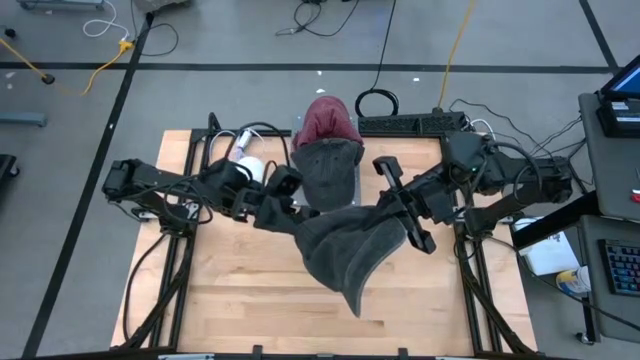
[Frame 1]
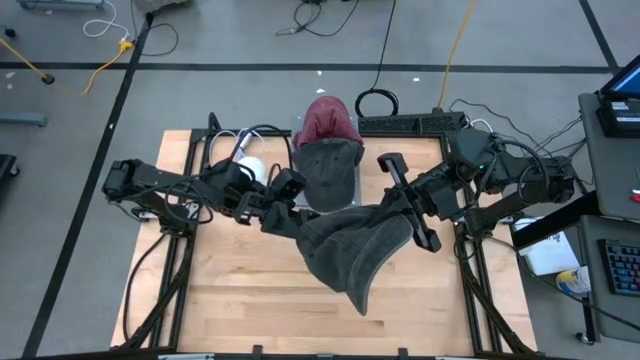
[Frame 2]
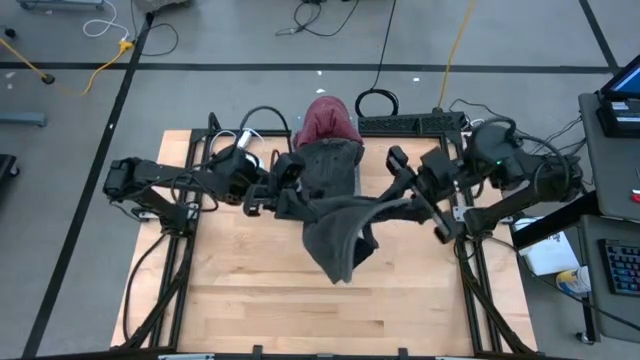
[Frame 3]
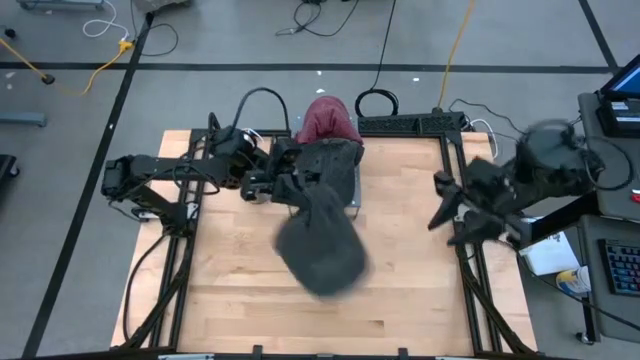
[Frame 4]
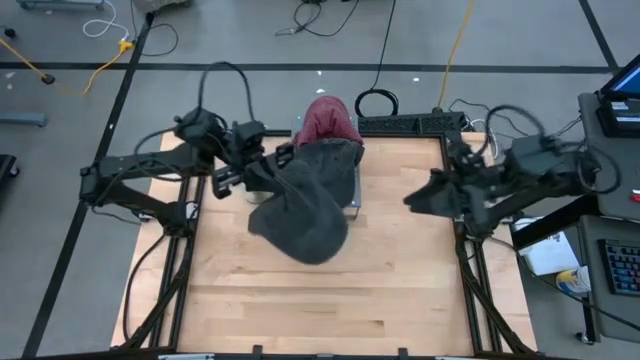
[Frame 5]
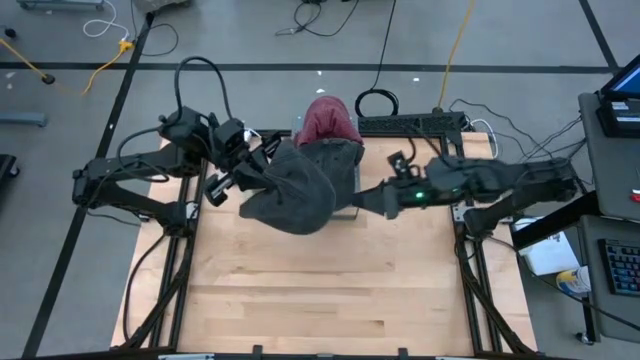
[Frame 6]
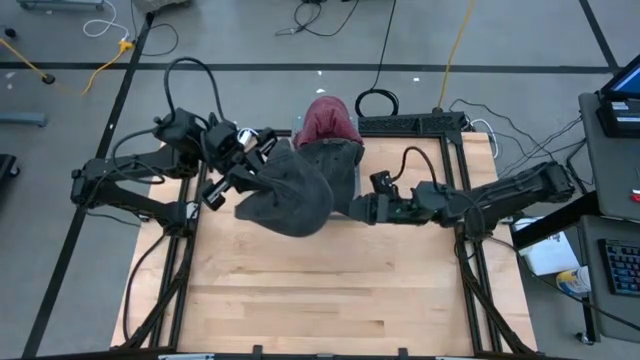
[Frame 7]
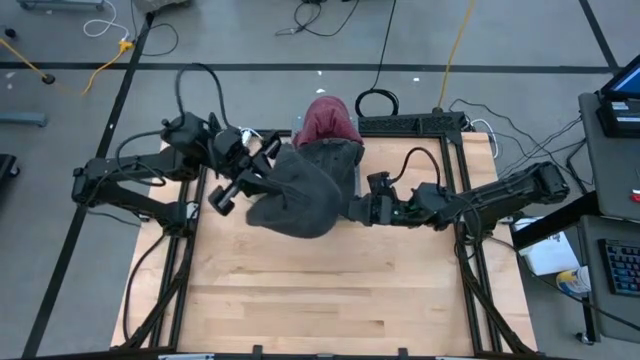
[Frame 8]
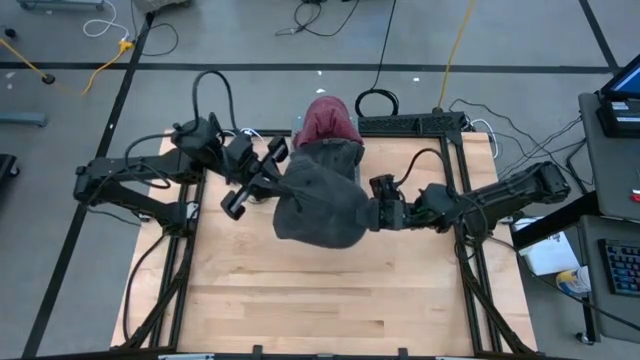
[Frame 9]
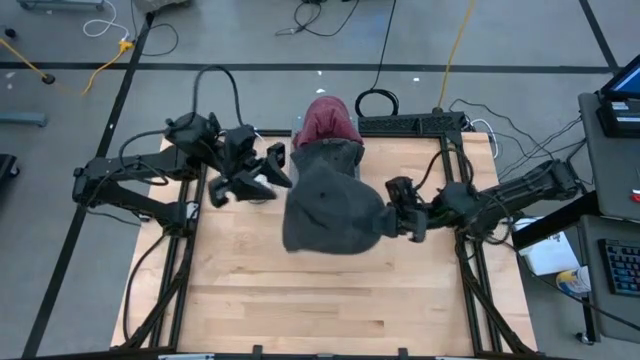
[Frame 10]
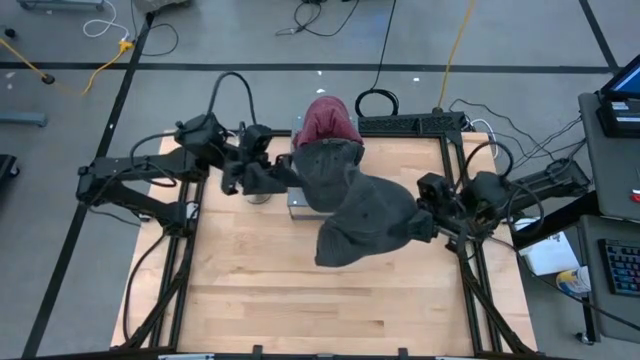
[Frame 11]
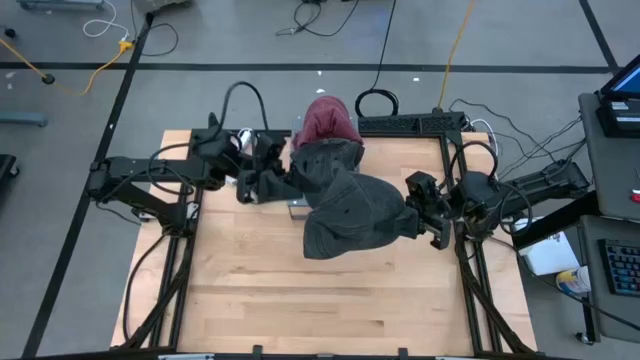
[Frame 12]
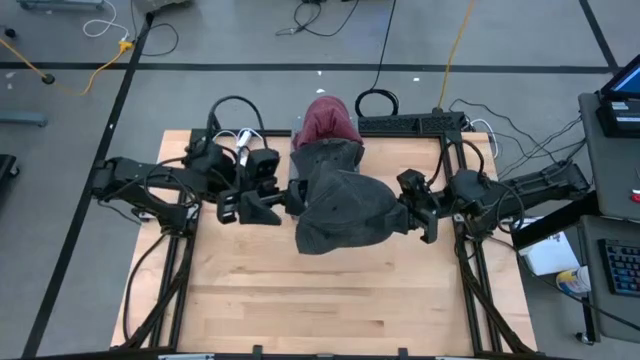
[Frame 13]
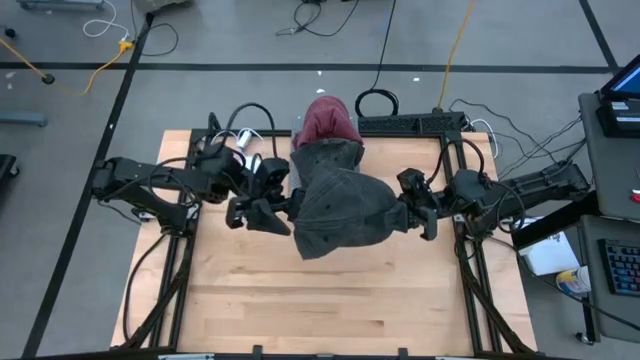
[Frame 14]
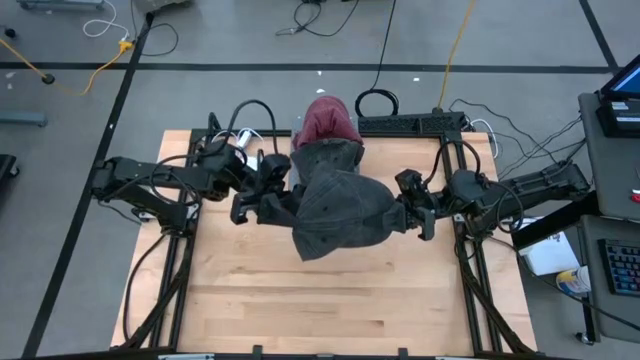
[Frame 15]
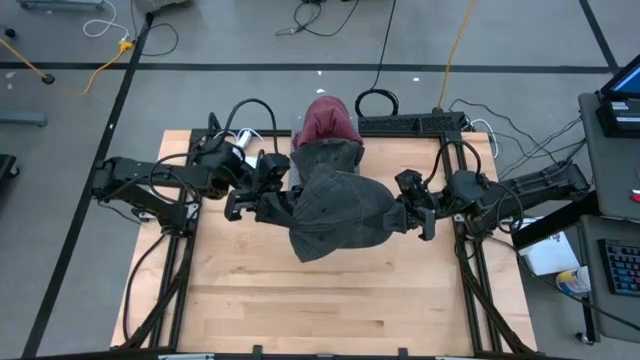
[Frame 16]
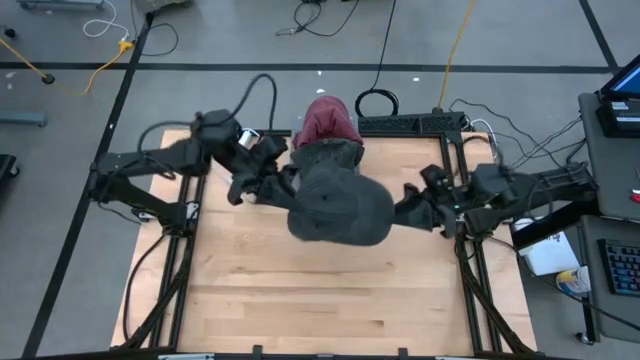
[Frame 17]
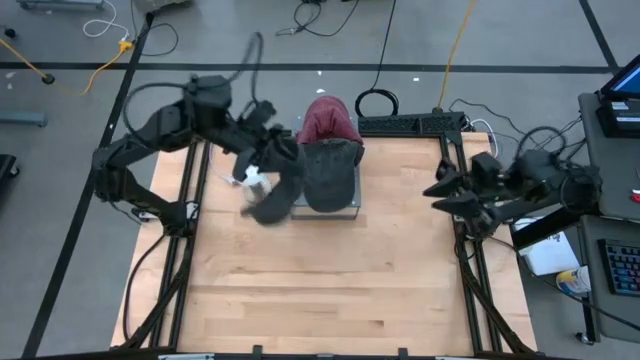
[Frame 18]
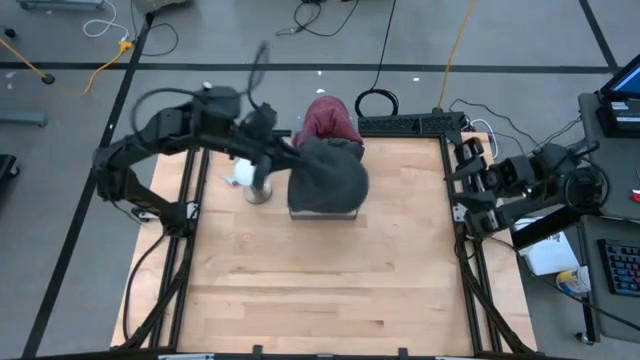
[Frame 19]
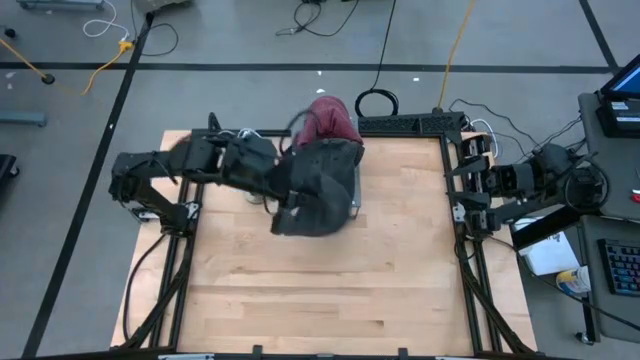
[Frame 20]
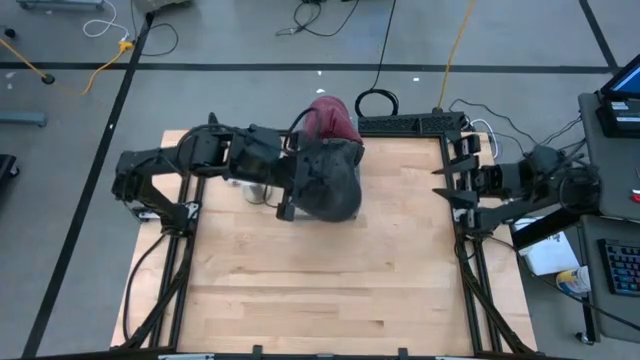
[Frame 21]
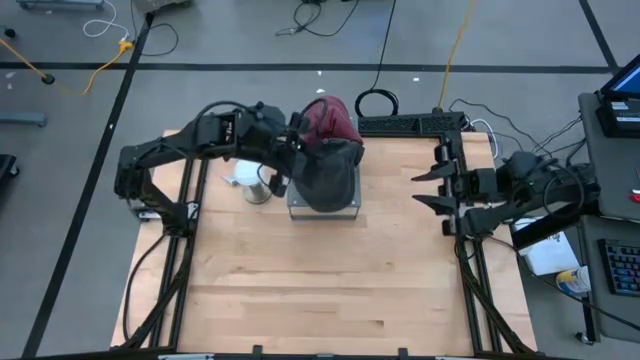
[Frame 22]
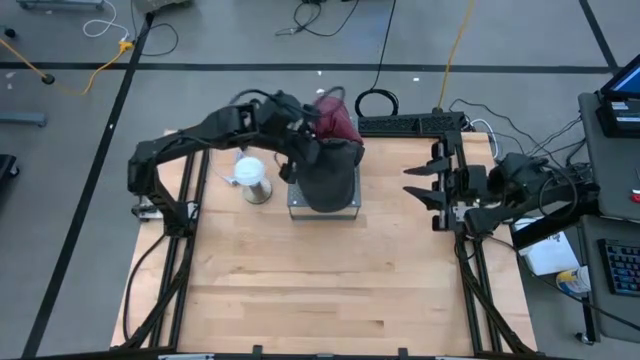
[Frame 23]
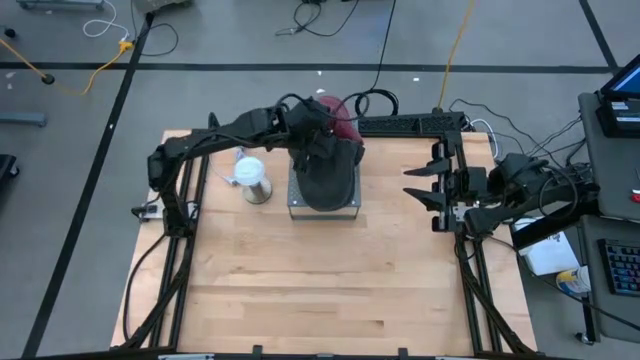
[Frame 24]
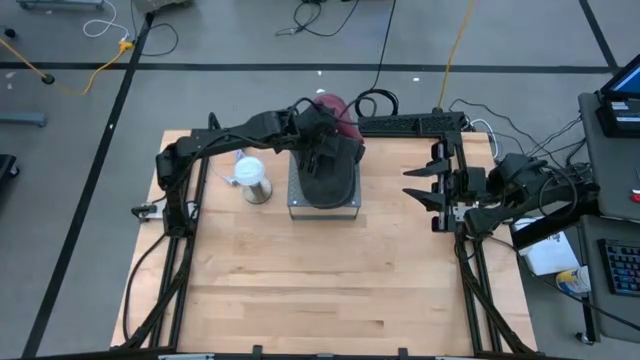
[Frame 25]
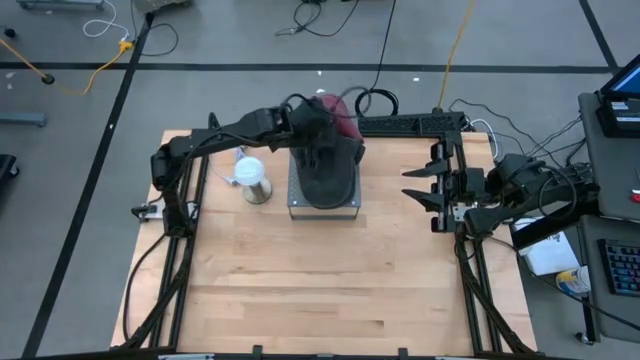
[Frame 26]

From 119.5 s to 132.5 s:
Task: Pick & Place hat
Stack the black cap on top of the black cap on the shelf

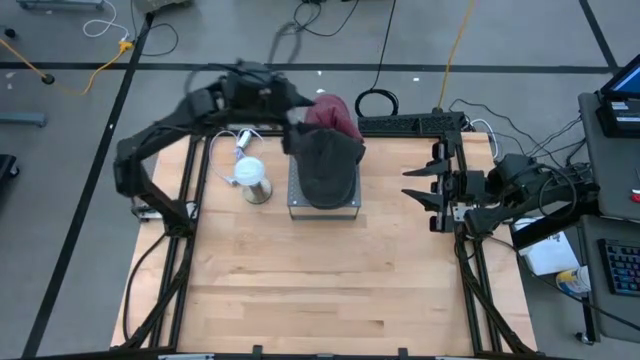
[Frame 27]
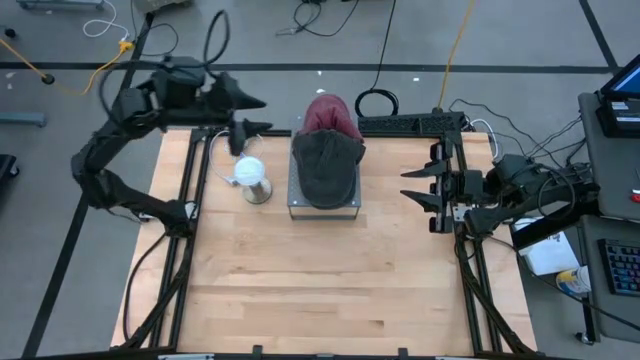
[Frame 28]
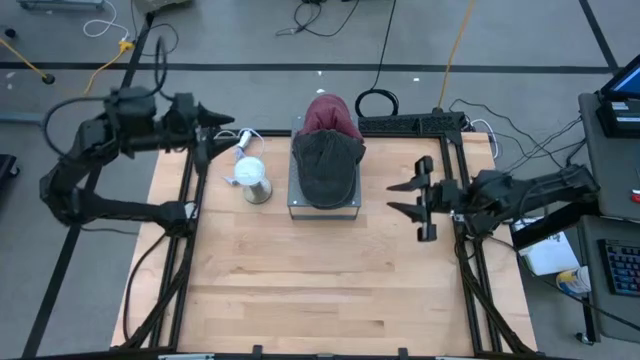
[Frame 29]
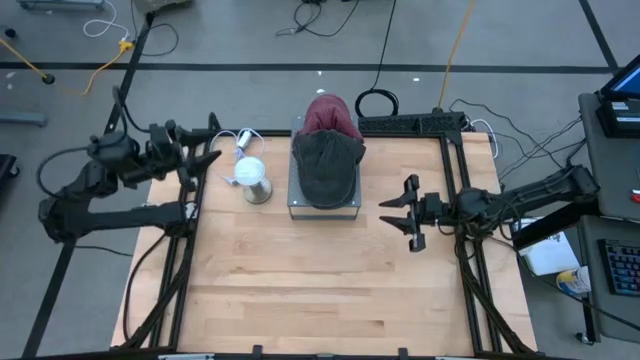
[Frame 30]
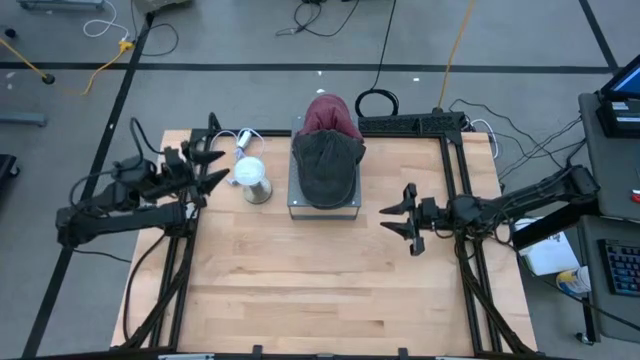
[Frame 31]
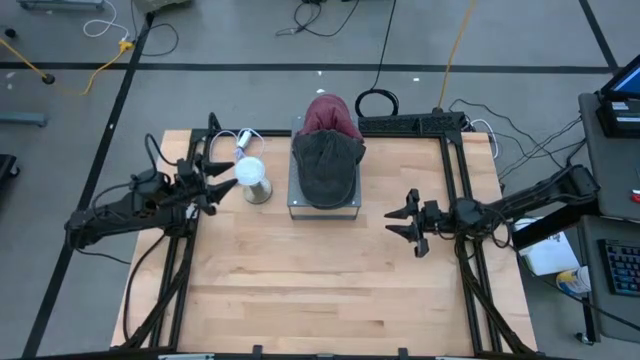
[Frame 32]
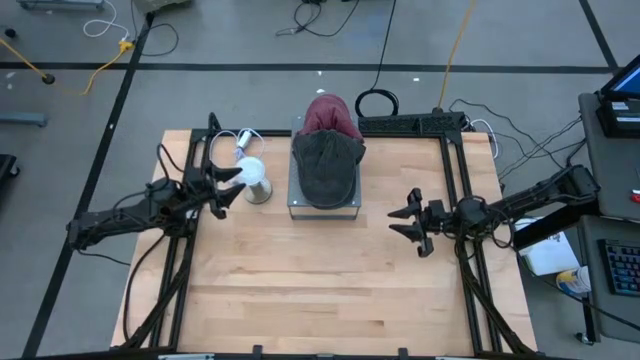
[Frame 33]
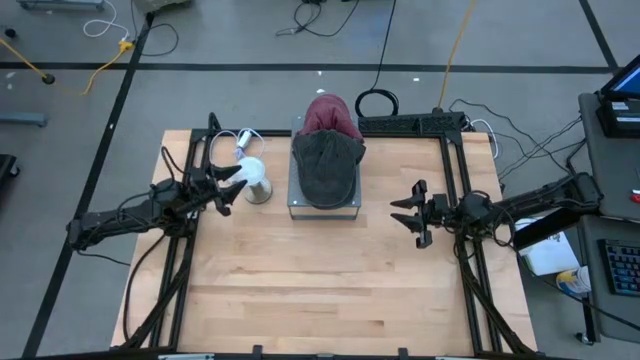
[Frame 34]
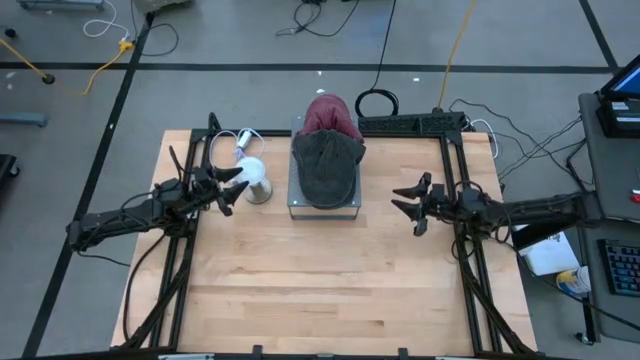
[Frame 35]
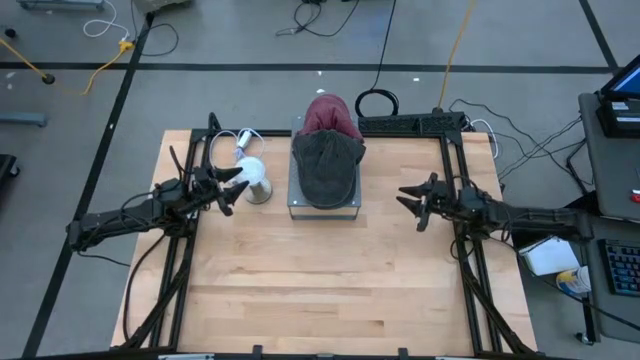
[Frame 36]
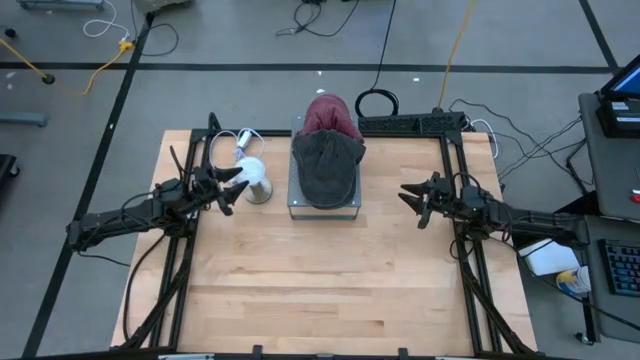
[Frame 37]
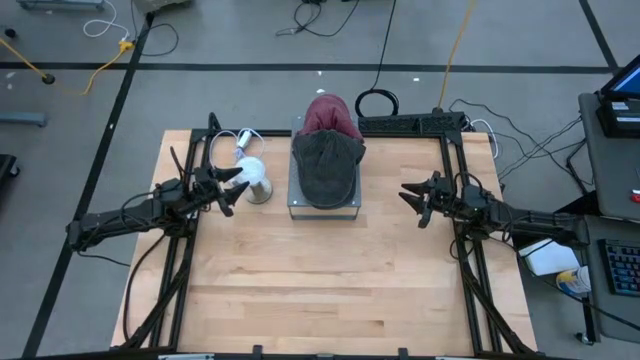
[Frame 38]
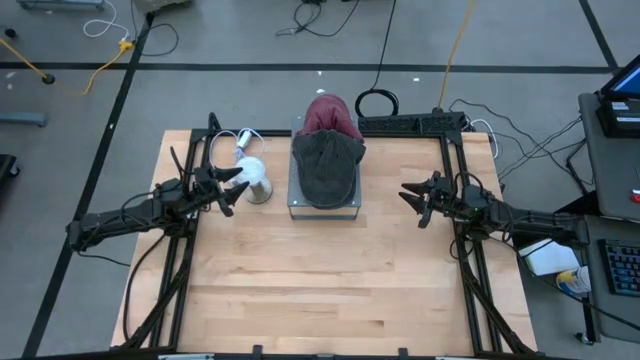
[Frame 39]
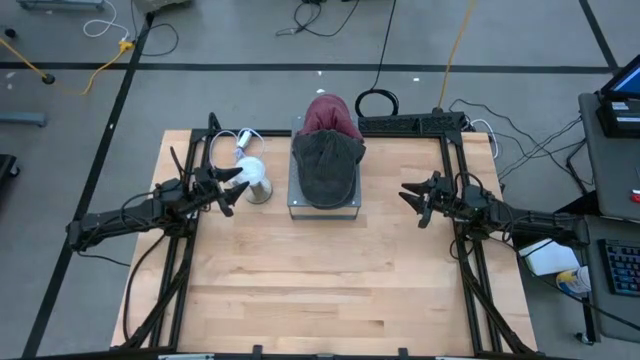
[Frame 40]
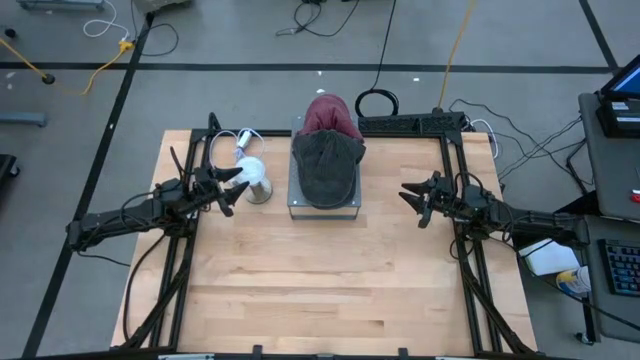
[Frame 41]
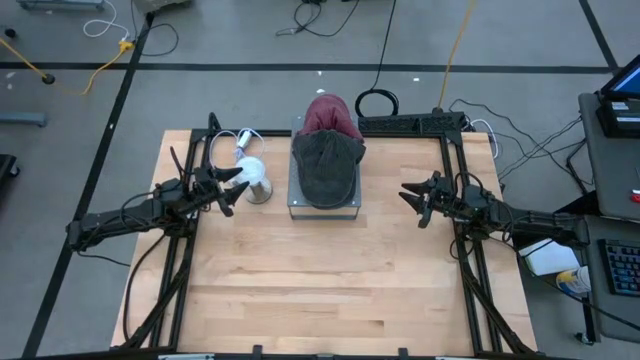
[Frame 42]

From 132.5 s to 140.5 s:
Return to Home Position
